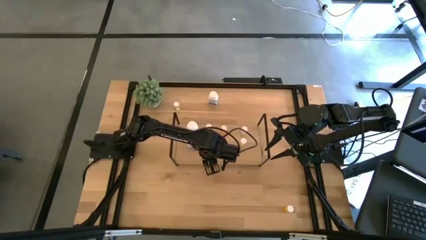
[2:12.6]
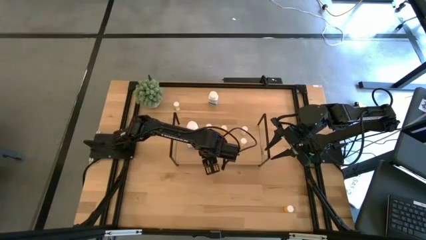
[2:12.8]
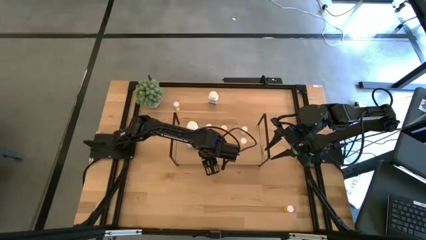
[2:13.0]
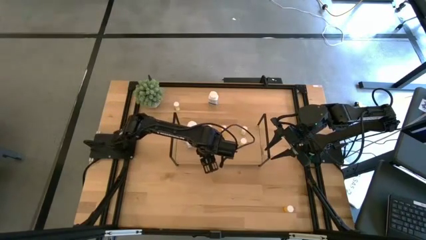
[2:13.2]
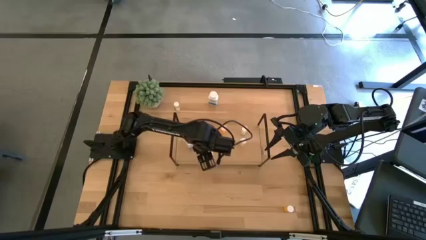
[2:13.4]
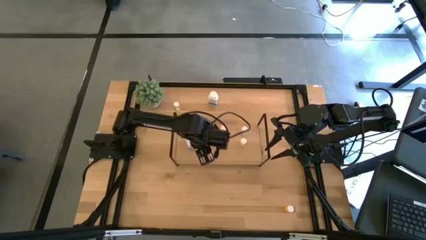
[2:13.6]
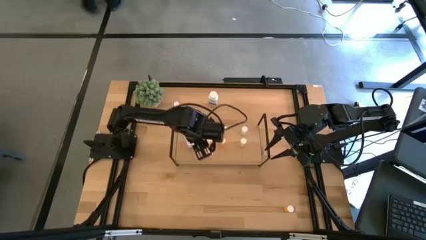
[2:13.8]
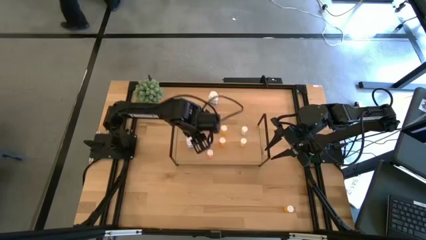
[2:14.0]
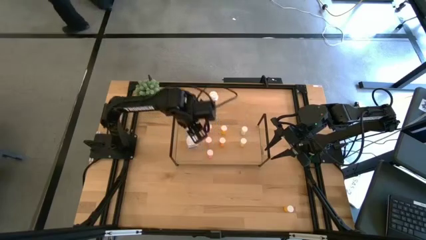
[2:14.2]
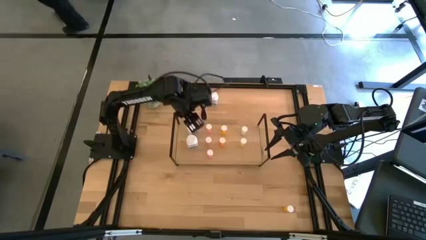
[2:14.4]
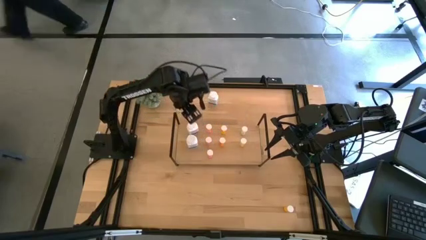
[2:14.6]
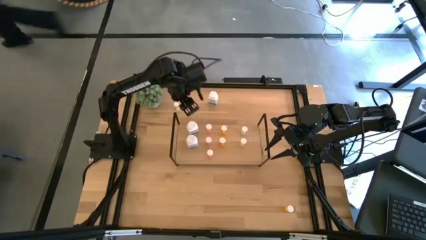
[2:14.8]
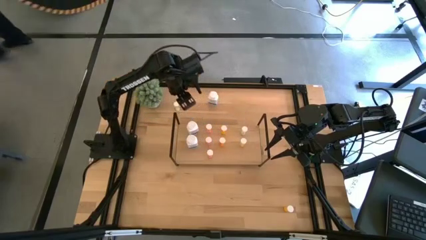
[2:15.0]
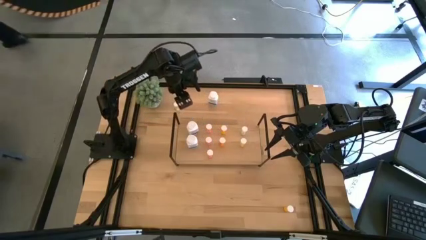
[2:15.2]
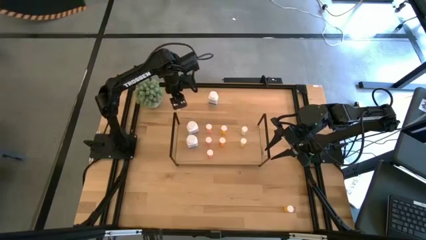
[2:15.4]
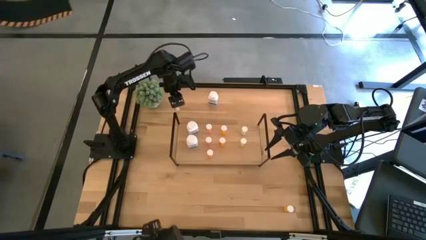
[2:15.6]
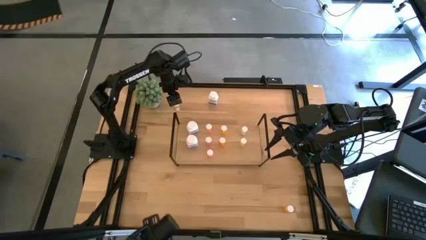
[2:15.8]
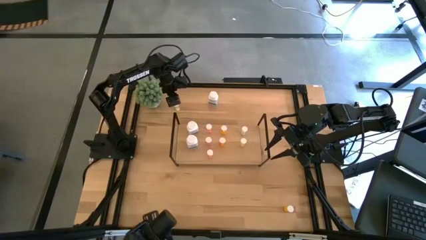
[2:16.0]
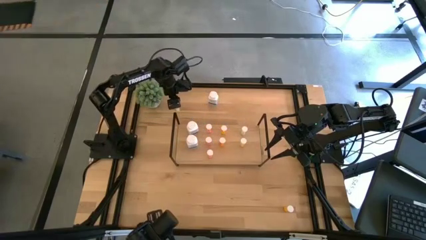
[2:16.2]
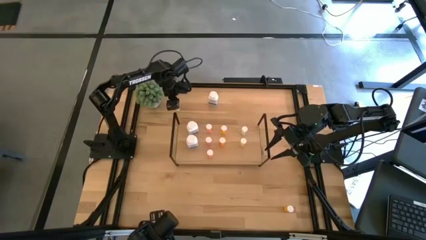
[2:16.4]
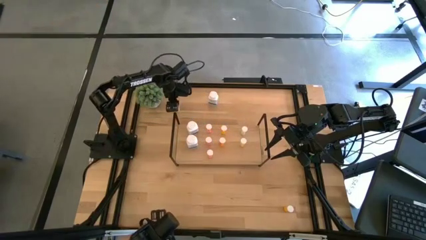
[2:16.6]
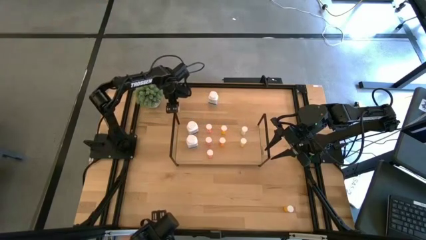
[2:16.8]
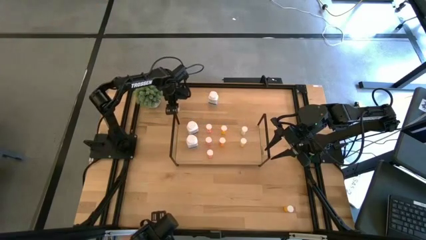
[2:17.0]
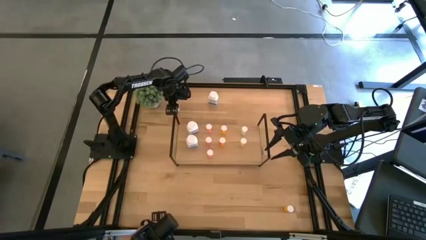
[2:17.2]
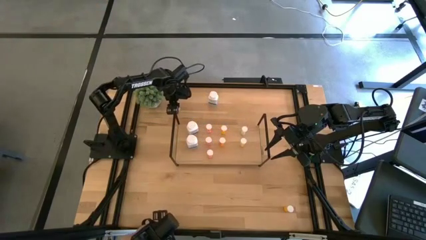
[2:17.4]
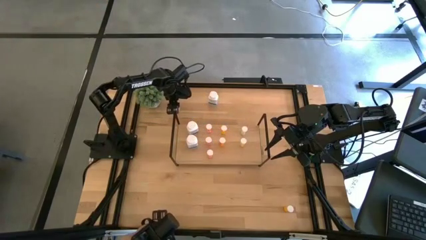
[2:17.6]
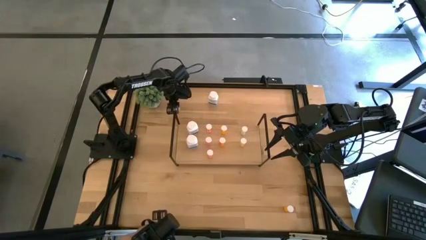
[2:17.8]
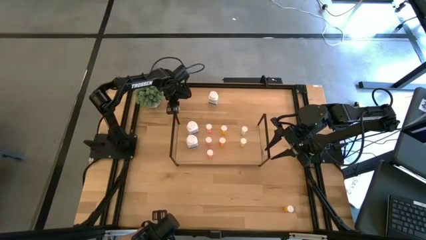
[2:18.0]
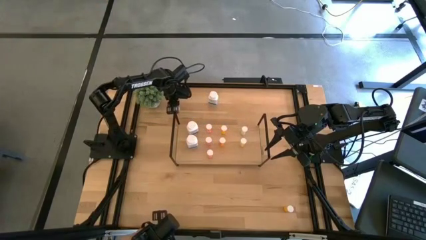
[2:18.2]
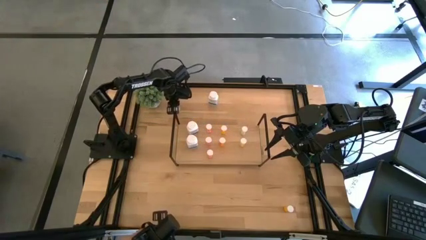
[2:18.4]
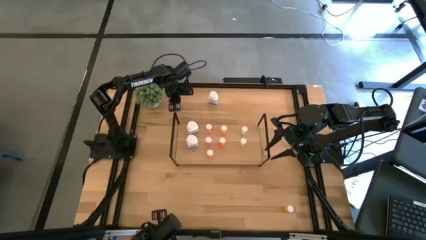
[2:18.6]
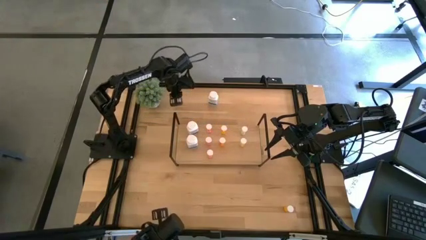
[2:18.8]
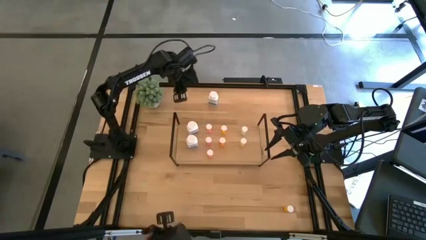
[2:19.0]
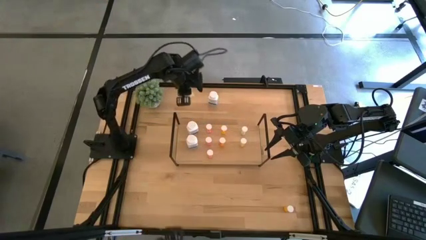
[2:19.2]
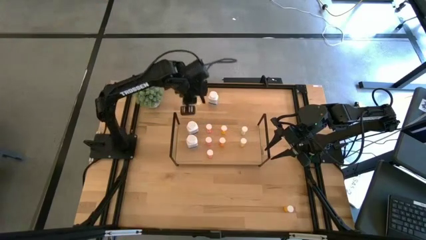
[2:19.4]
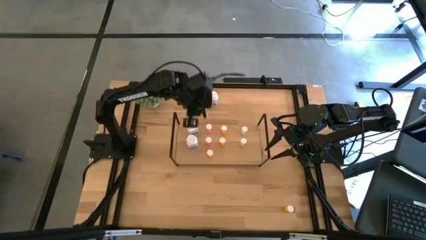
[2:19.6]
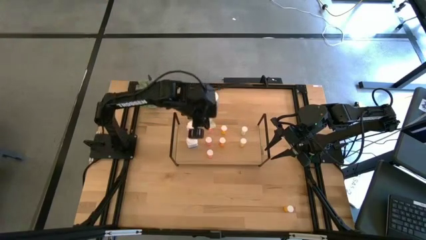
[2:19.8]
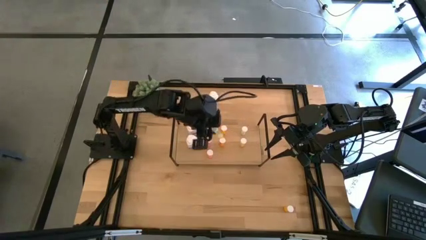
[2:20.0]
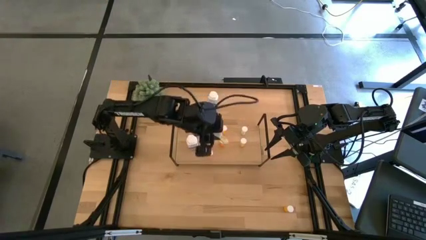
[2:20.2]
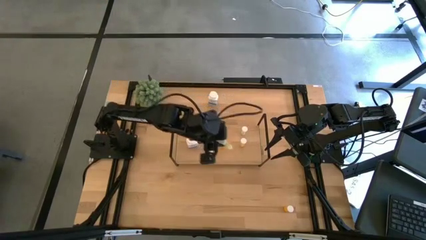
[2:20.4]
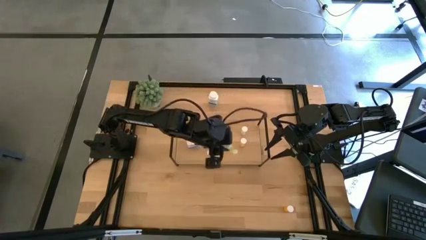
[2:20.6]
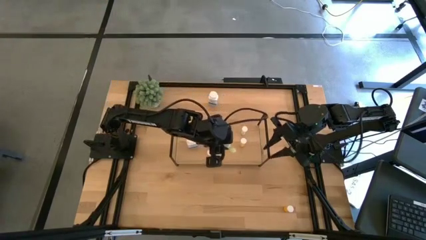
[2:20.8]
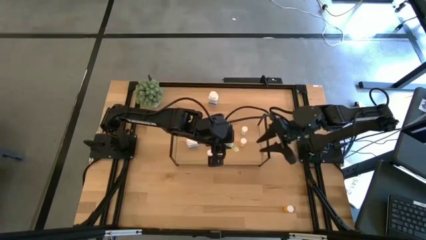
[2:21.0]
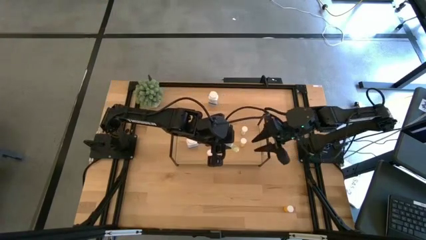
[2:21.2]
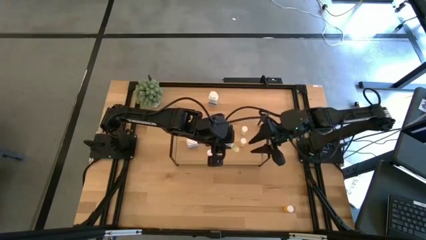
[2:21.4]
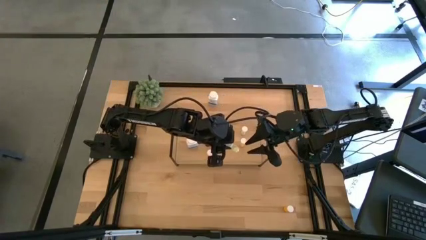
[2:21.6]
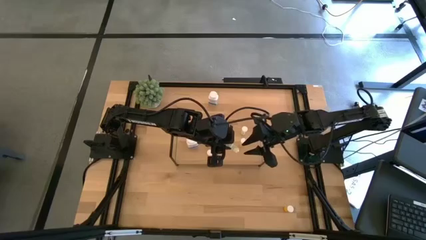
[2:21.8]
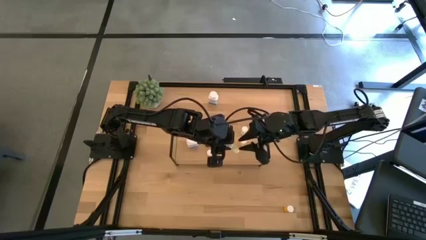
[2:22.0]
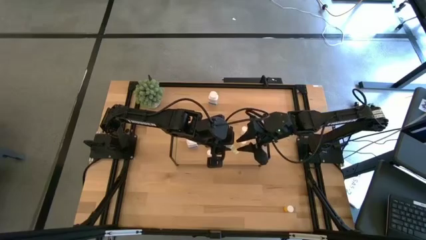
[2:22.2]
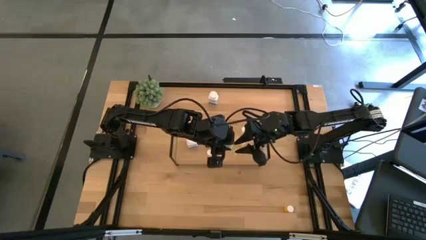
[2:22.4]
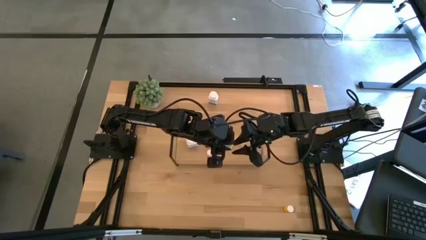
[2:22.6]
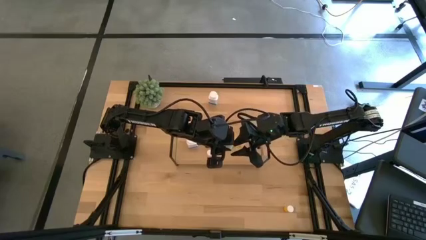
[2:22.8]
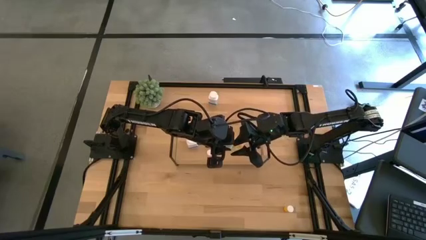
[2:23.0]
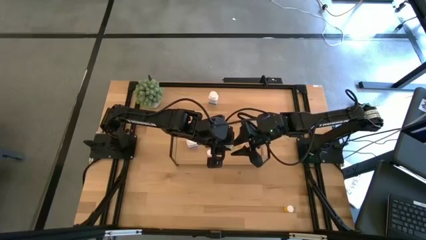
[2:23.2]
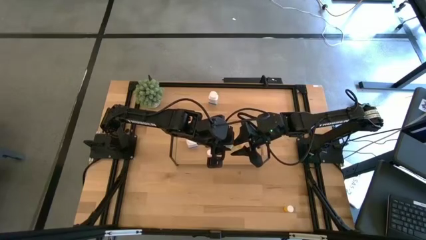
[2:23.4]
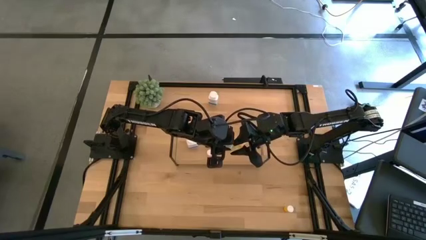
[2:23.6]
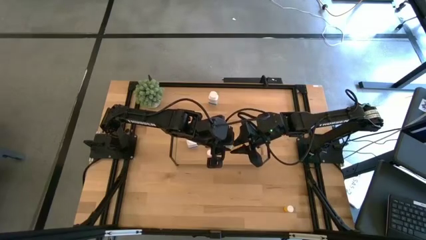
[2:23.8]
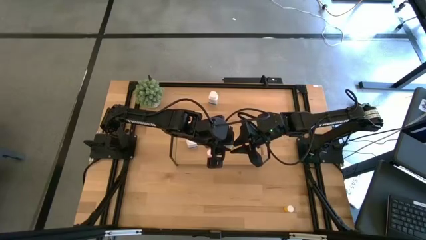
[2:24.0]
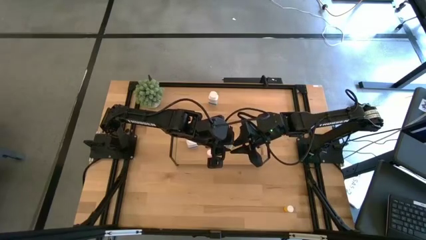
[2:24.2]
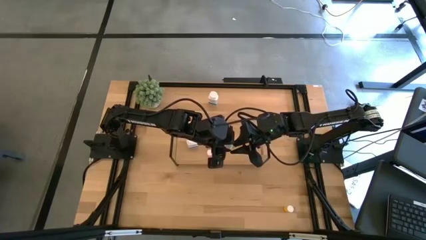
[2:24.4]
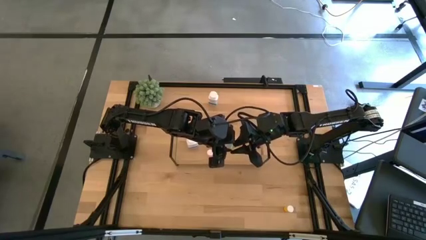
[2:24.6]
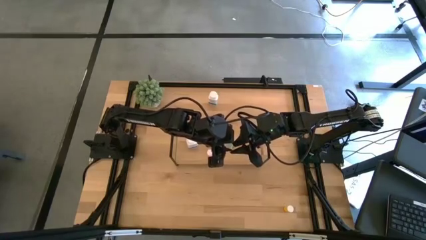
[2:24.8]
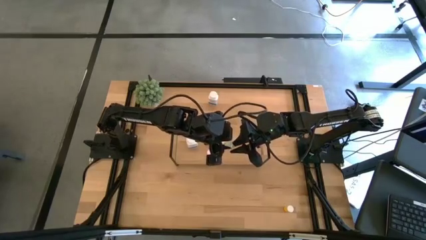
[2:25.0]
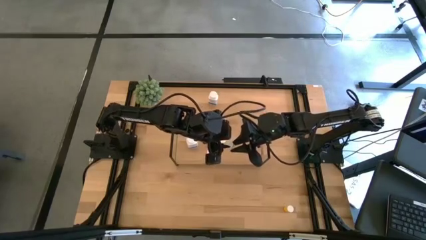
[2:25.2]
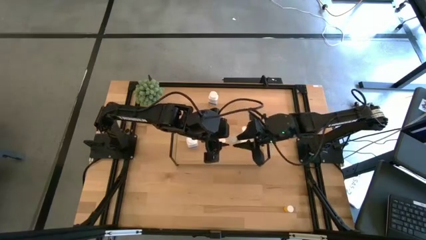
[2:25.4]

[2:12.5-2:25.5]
Task: Pick and place medicine bottles onto shelf by color
Put the yellow pill bottle on the shelf aligned with the other yellow pill bottles

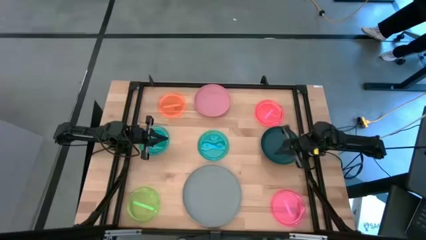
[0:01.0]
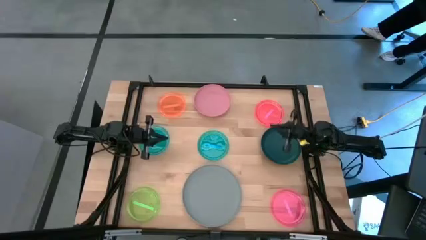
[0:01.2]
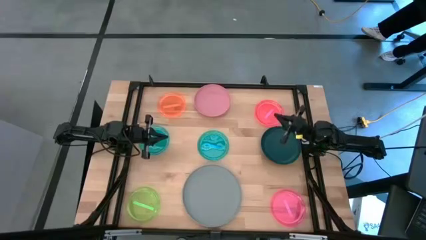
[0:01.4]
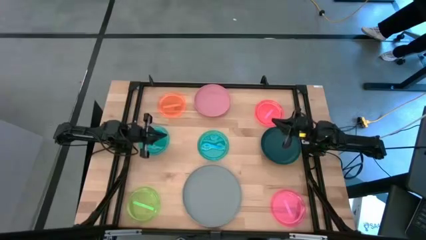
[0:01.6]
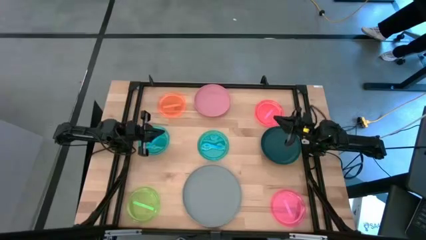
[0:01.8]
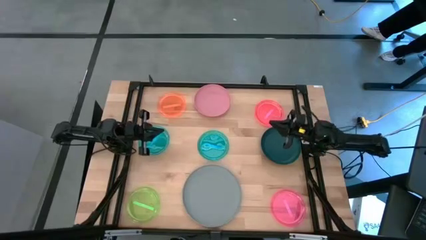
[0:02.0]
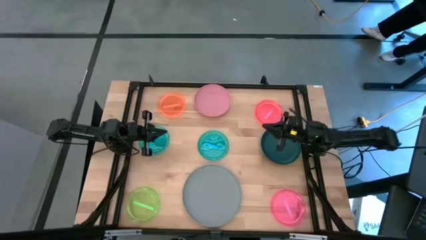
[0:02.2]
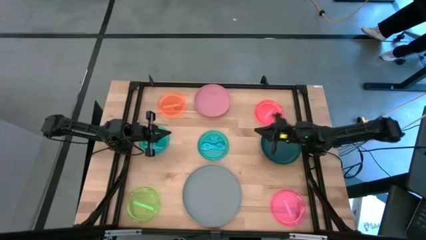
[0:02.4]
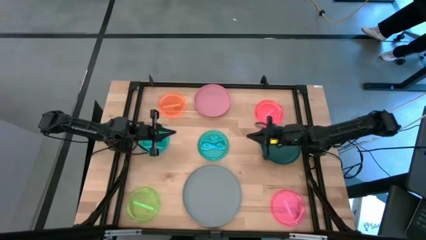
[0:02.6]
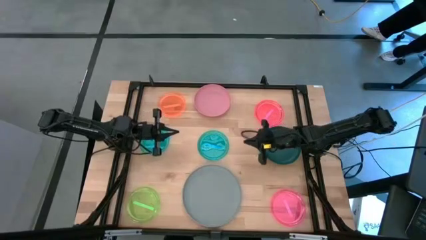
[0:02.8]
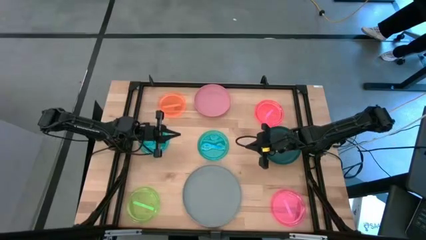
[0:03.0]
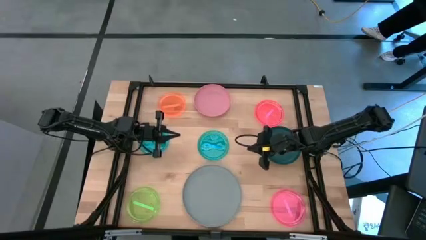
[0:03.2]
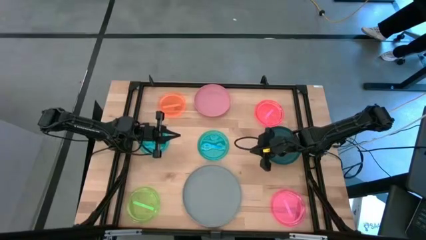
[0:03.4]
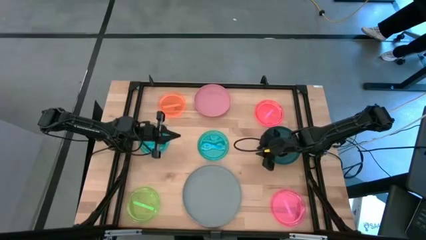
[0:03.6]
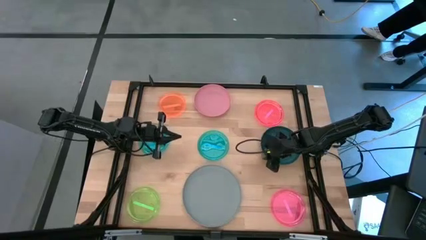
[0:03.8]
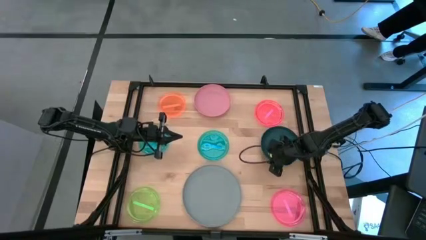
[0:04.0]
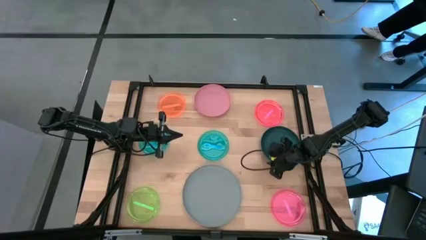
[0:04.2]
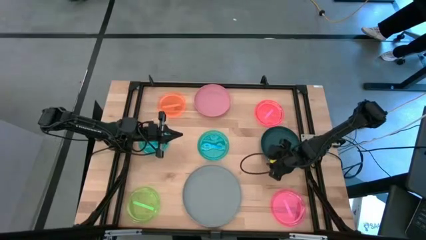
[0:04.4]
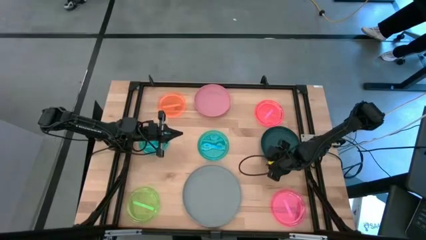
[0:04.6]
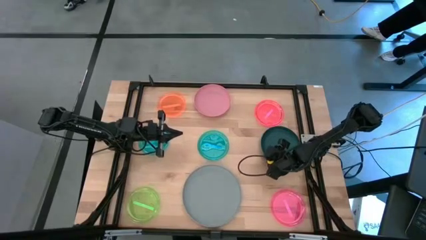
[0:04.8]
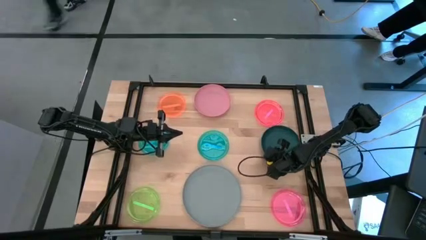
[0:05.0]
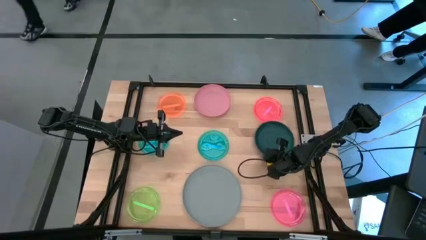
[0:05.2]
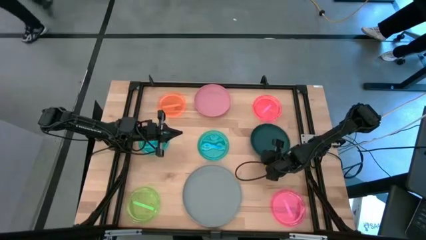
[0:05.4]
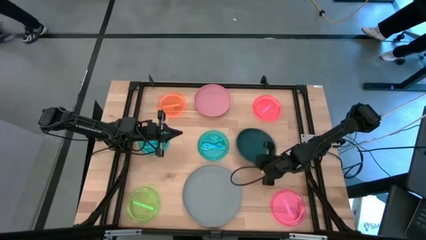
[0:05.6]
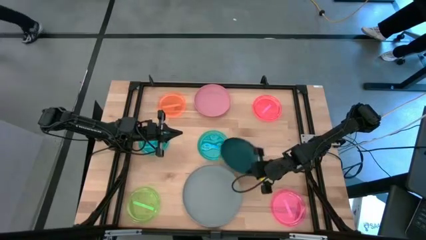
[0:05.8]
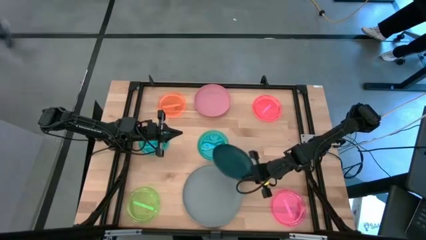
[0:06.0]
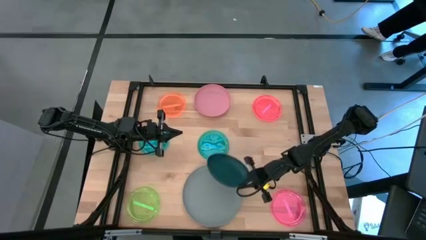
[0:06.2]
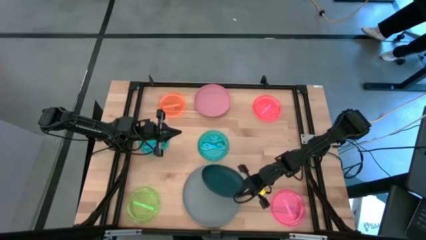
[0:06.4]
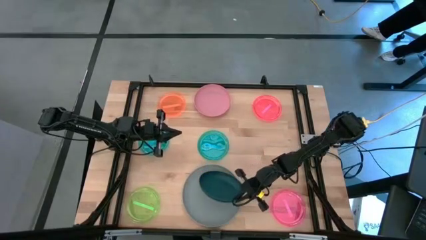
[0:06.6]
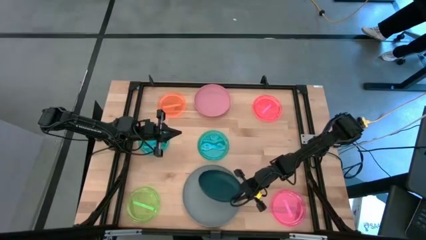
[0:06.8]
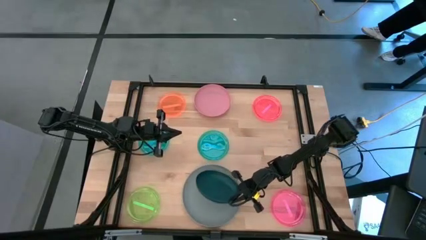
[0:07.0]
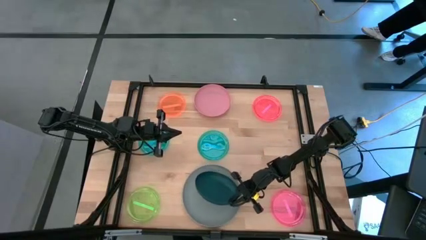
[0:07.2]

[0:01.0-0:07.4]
Task: Stack plastic plates
Stack the dark blue plate on top of gray plate
